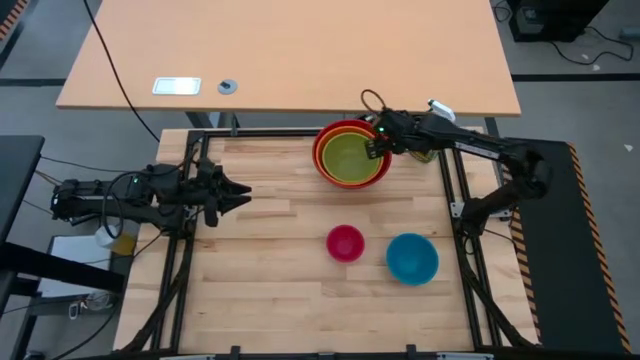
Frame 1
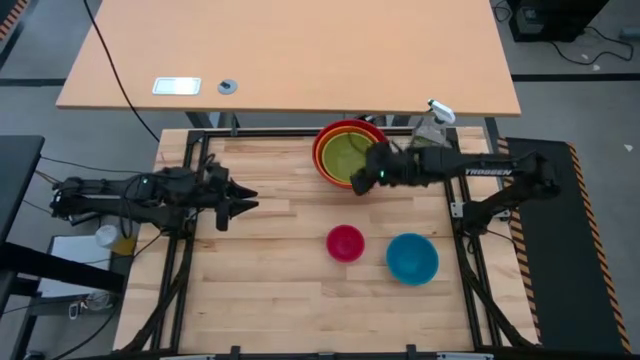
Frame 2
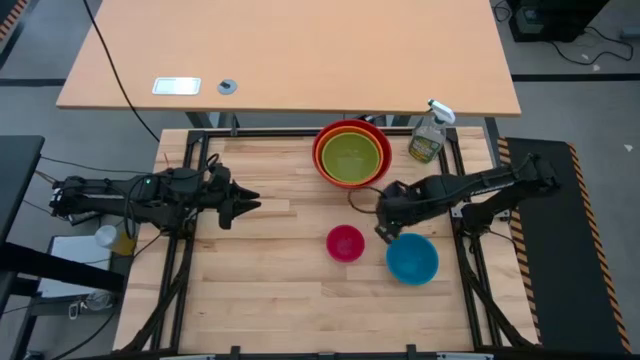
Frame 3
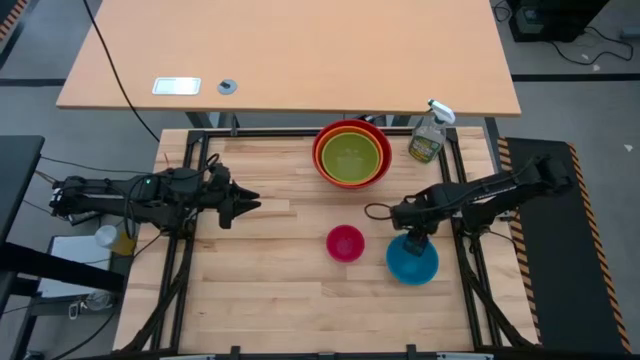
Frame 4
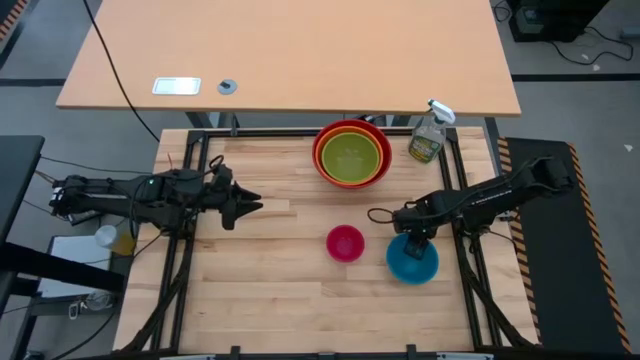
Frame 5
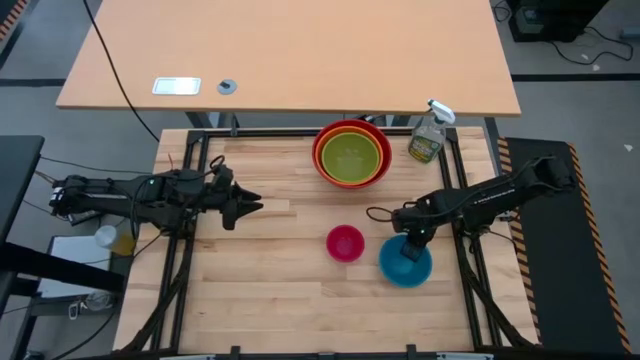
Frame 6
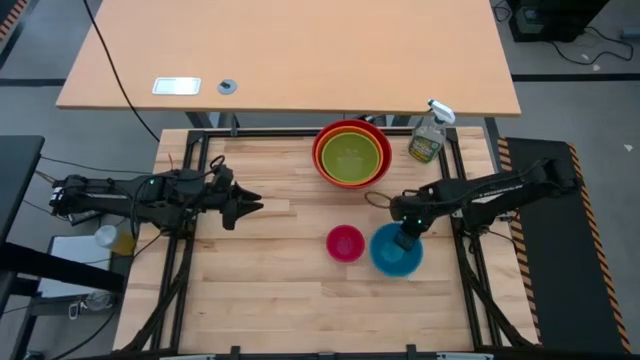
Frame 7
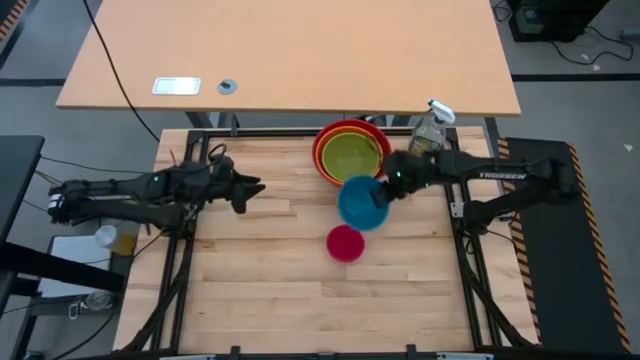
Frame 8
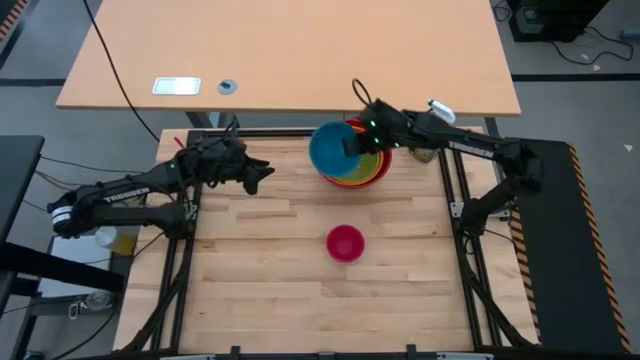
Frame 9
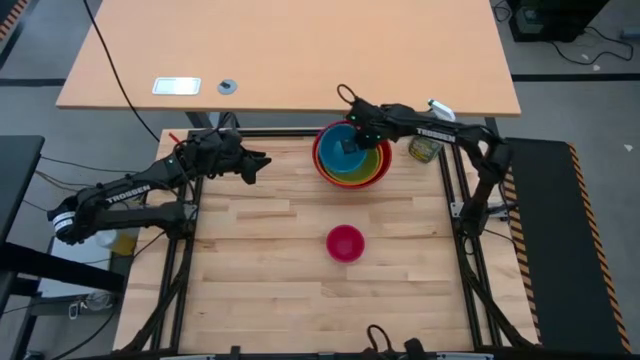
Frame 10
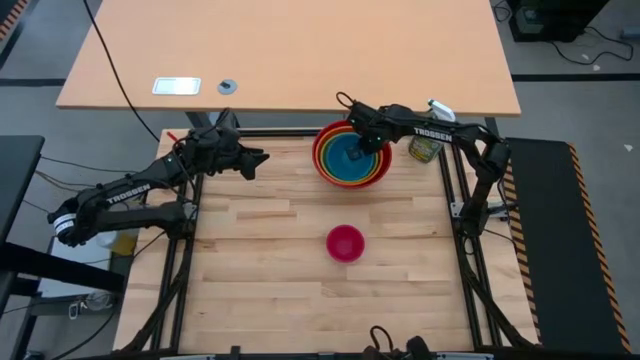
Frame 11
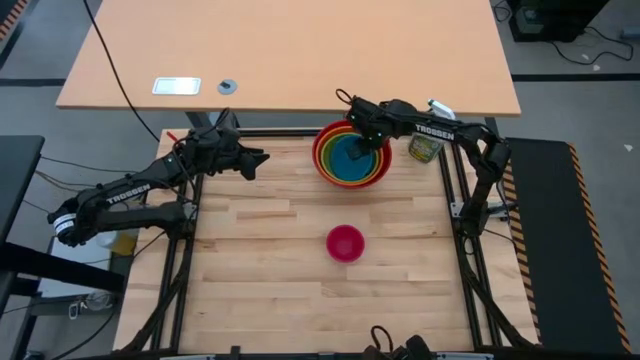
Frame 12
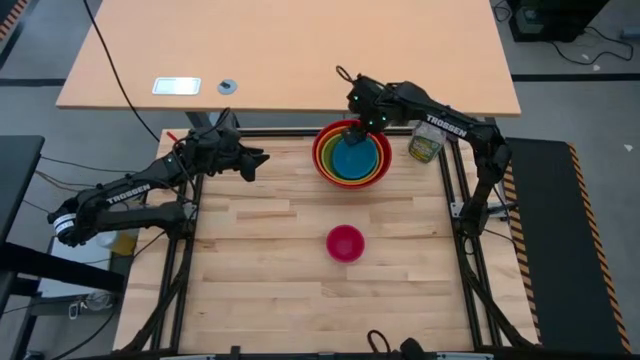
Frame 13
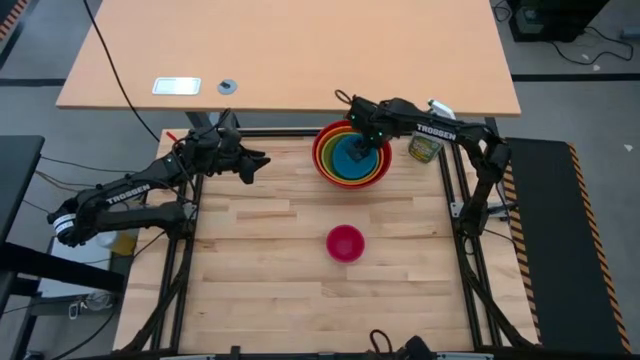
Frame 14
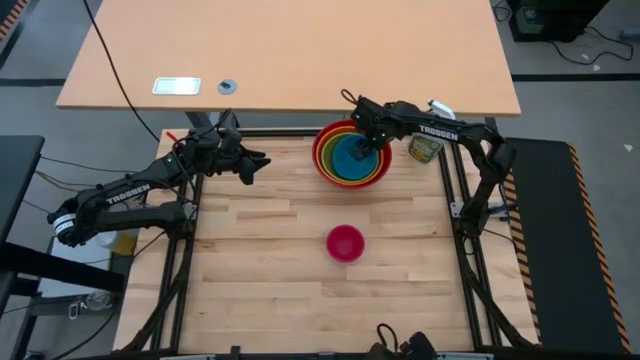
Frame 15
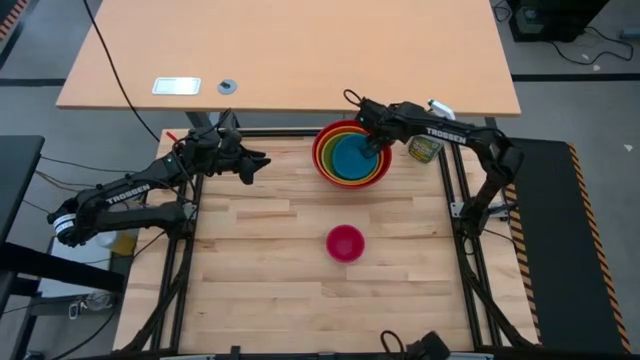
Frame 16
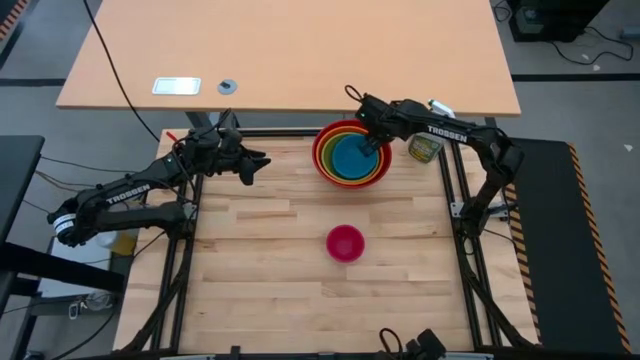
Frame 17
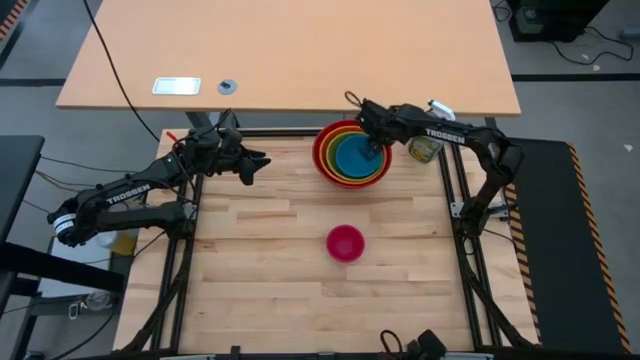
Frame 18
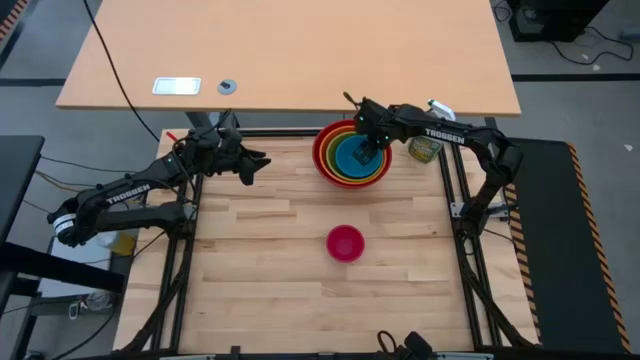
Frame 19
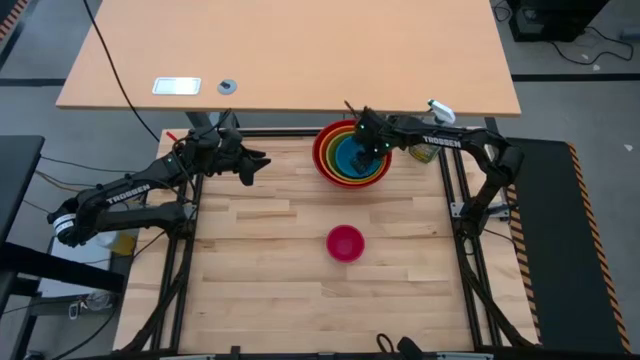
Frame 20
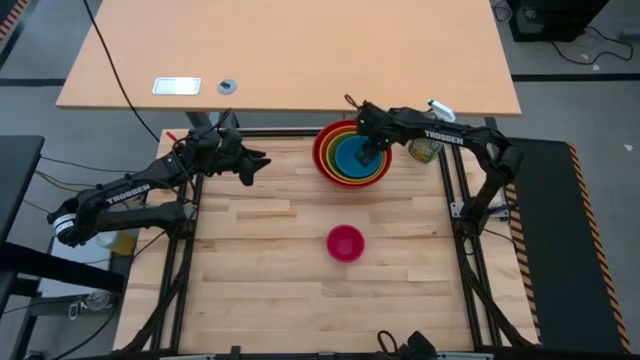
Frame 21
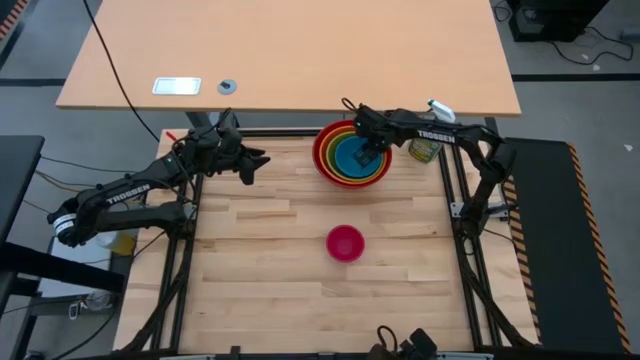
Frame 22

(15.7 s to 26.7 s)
Stack the blue bowl on top of the green bowls

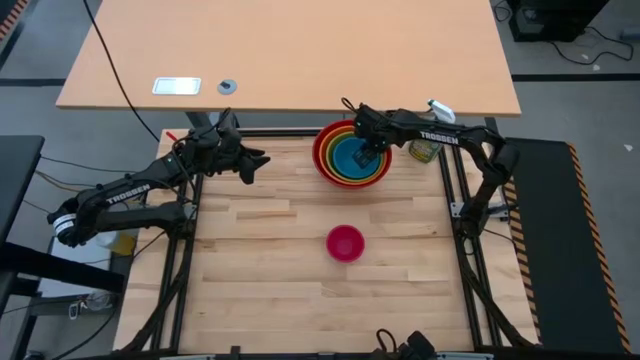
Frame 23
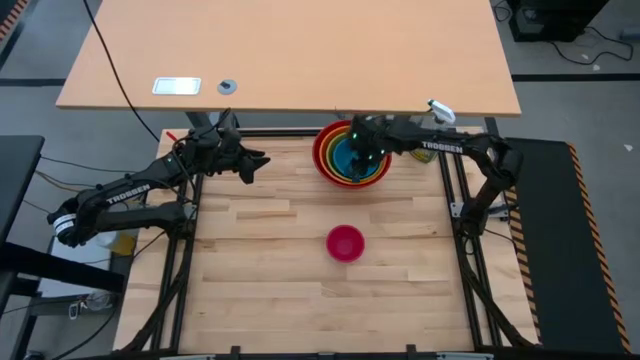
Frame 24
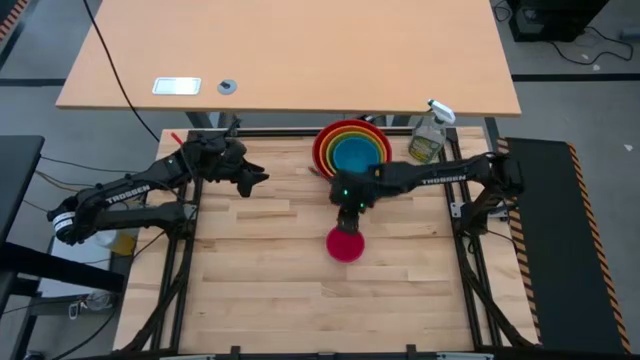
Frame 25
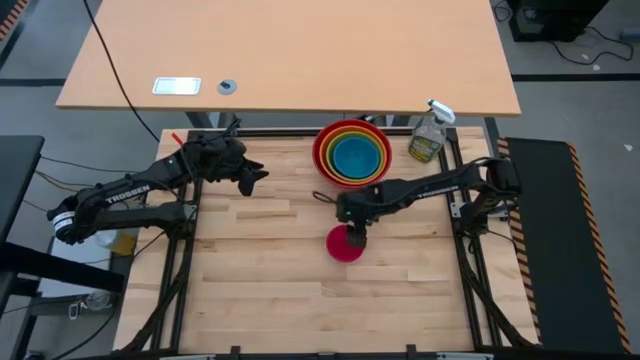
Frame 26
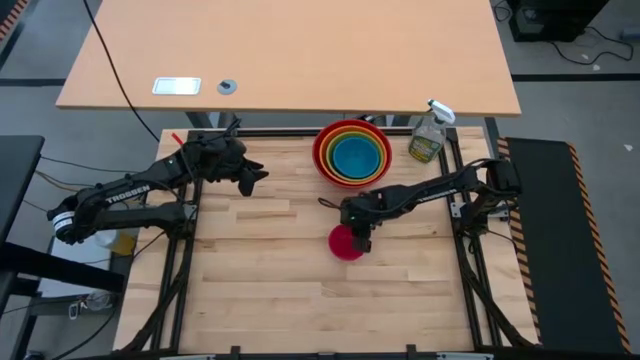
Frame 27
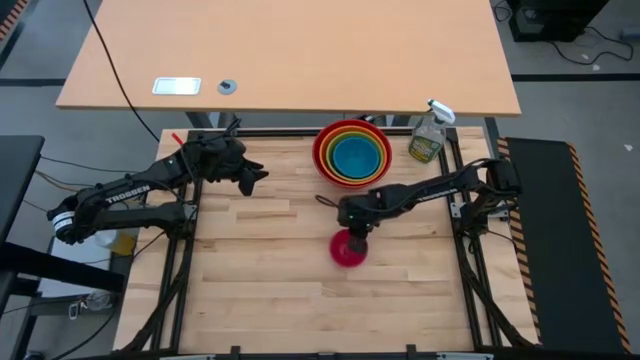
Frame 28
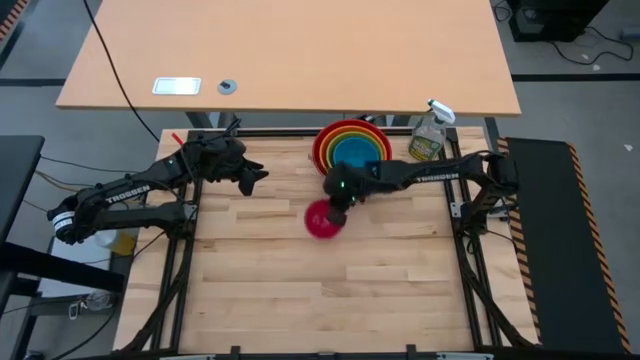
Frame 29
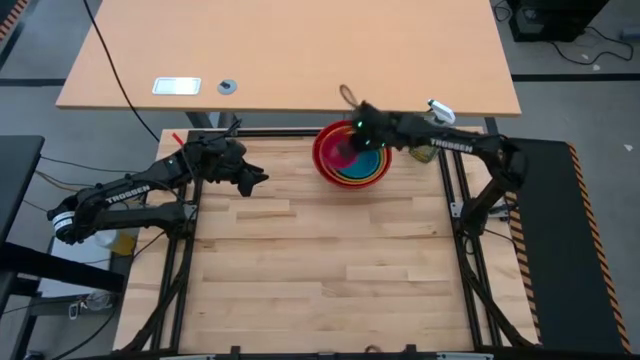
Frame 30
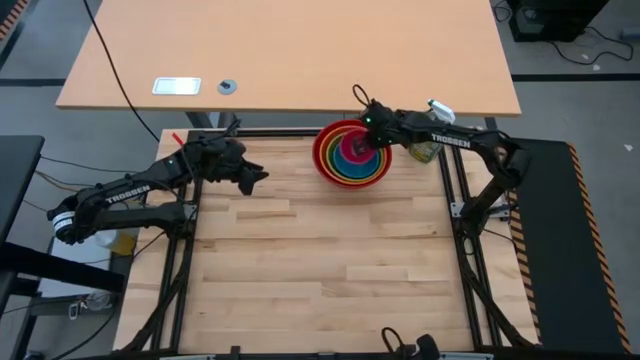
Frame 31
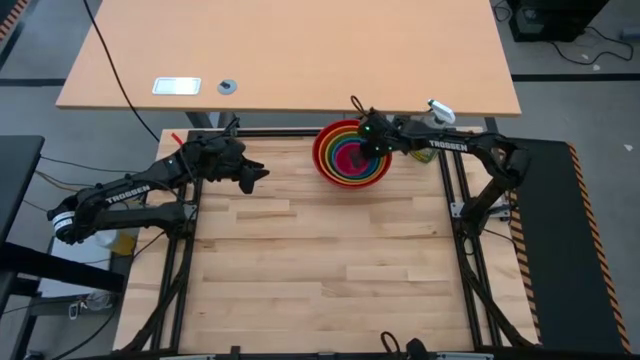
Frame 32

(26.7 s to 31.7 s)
Stack the pink bowl on top of the blue bowls

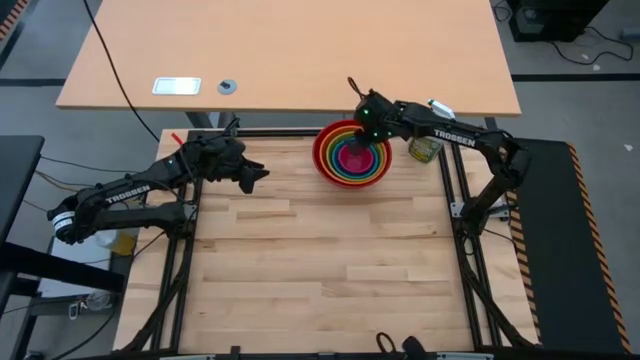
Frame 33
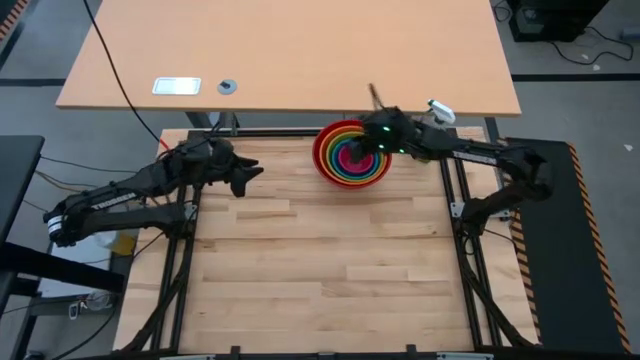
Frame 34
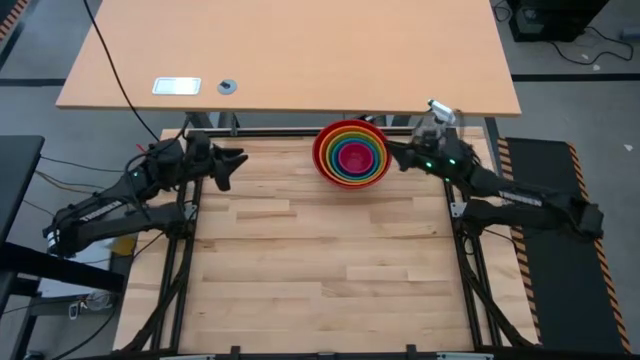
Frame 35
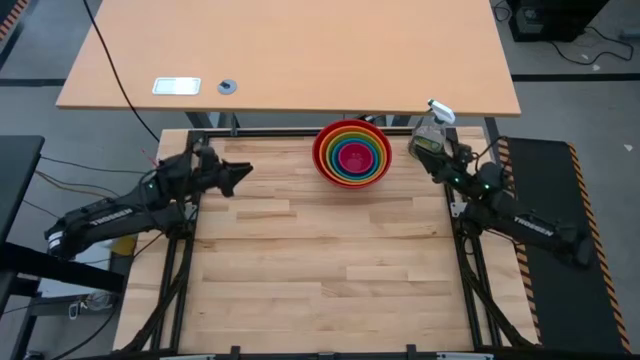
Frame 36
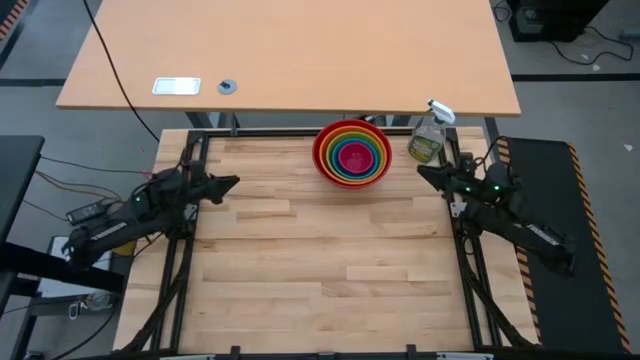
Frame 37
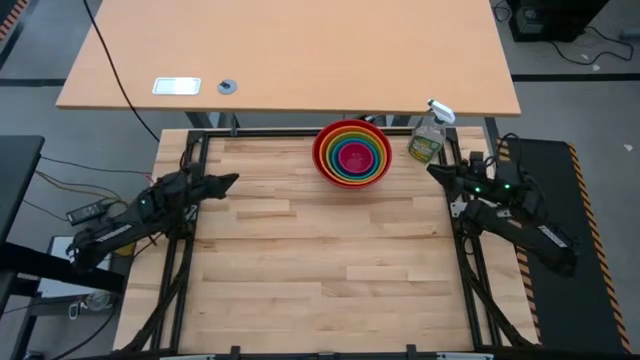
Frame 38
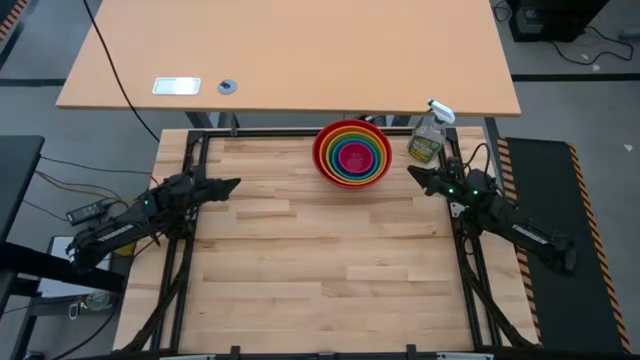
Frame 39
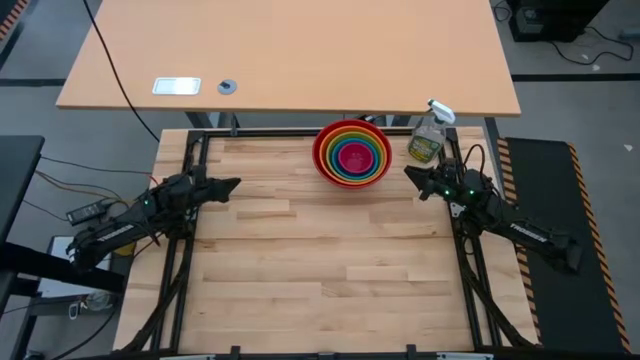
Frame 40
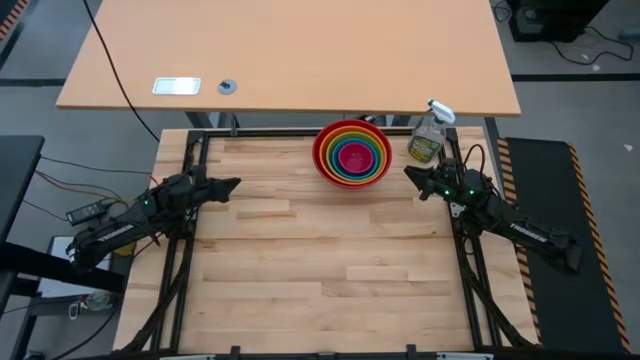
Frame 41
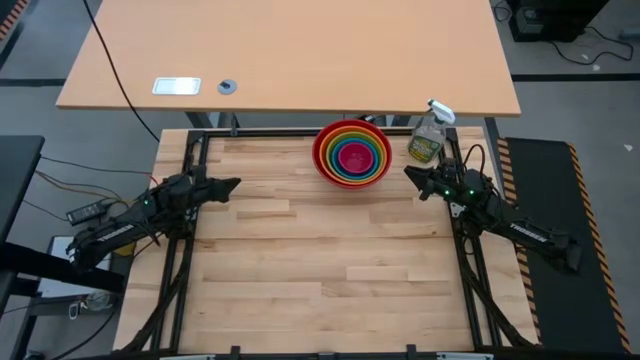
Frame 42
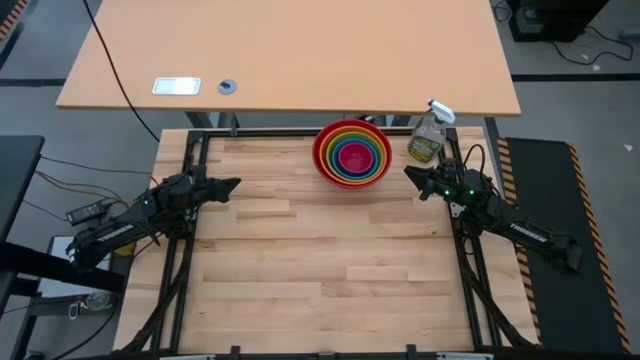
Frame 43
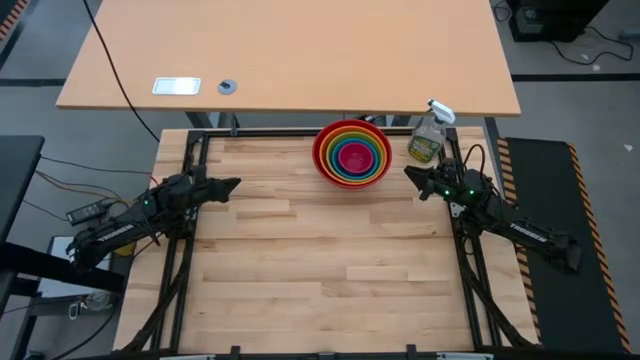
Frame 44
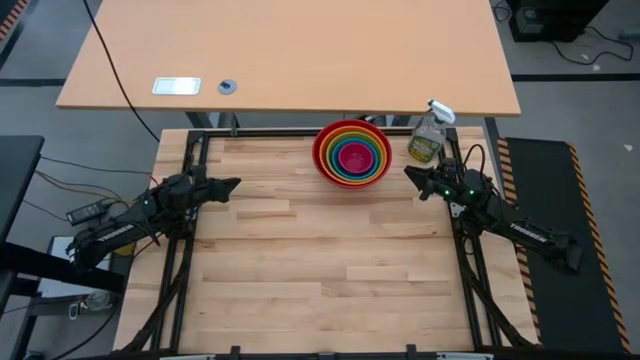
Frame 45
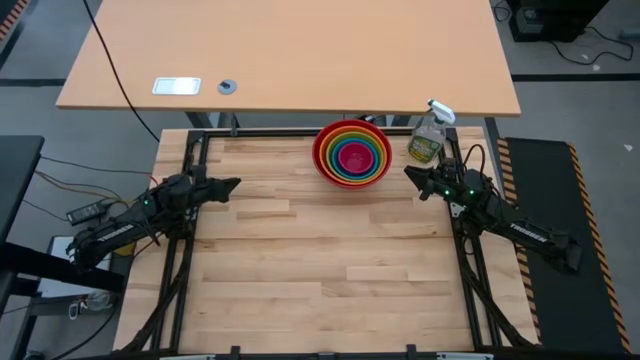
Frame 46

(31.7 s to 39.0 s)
Return to Home Position
